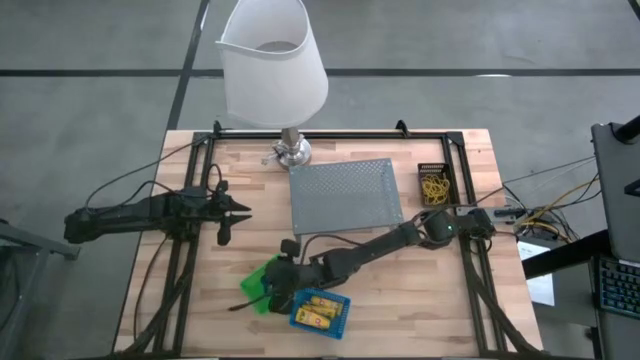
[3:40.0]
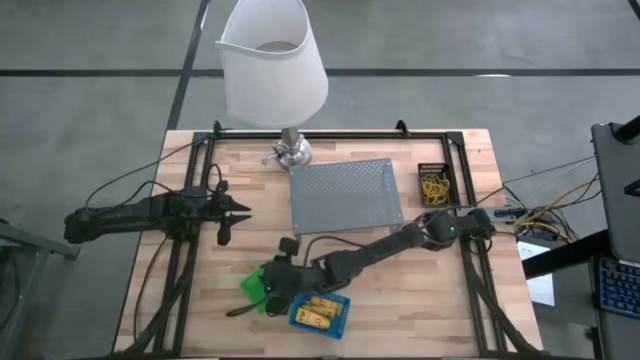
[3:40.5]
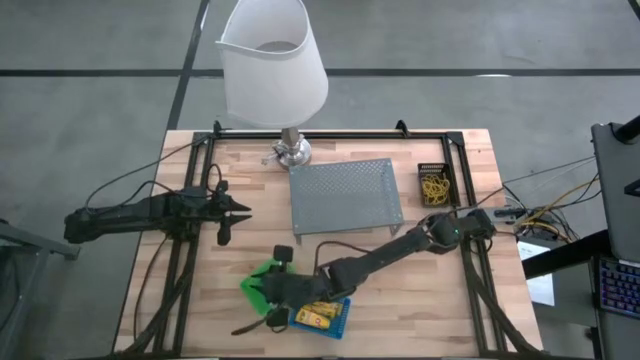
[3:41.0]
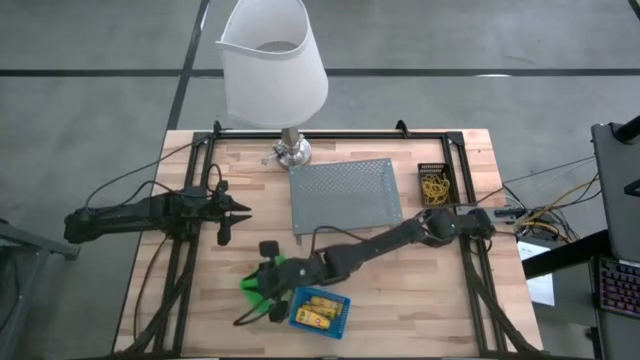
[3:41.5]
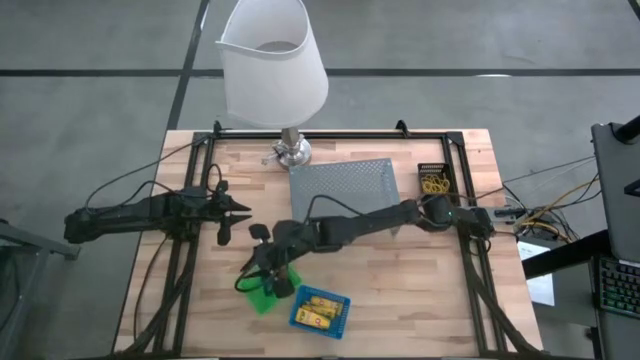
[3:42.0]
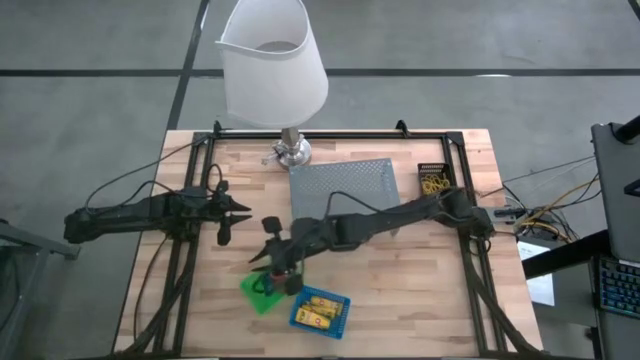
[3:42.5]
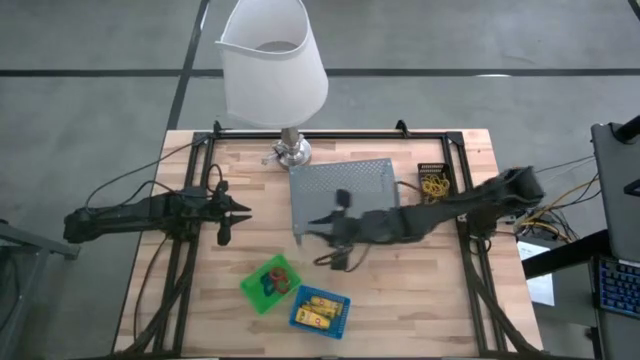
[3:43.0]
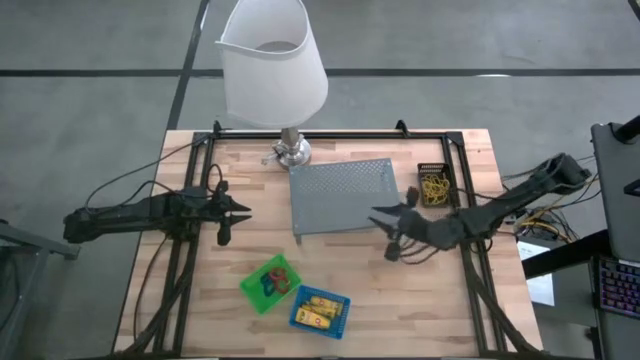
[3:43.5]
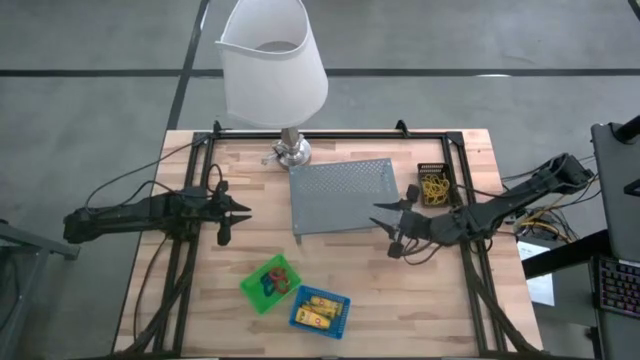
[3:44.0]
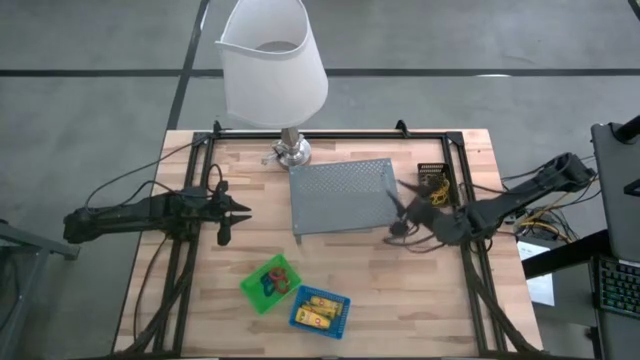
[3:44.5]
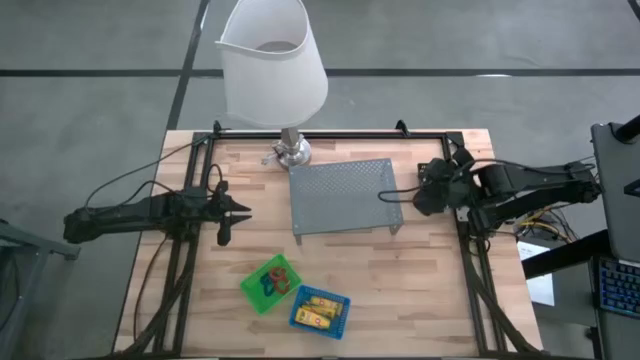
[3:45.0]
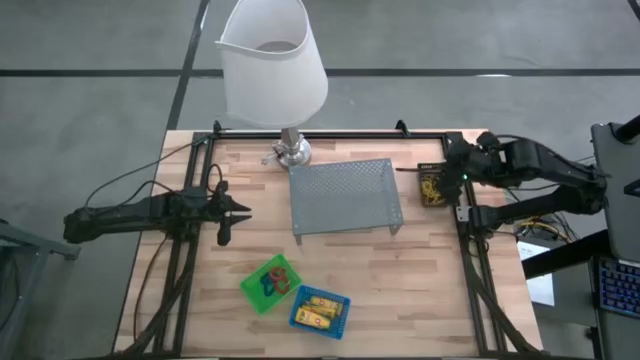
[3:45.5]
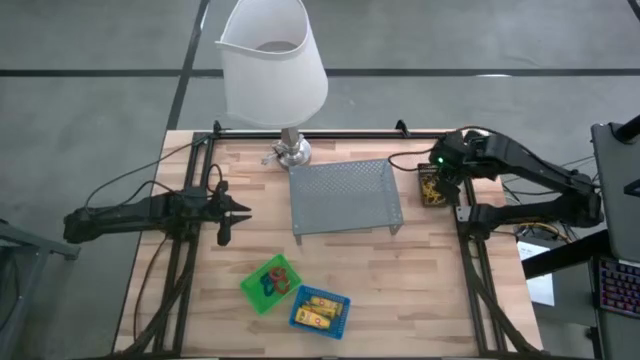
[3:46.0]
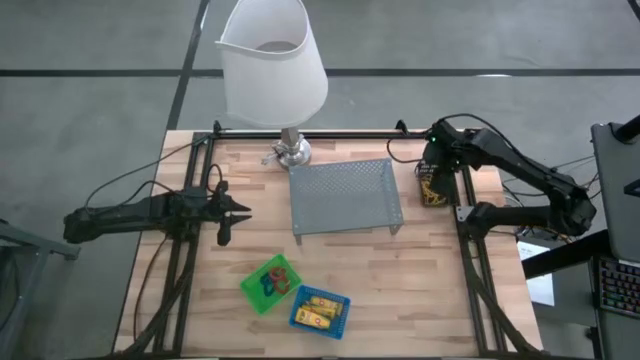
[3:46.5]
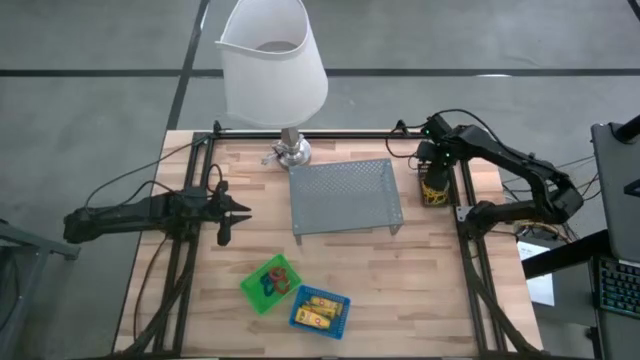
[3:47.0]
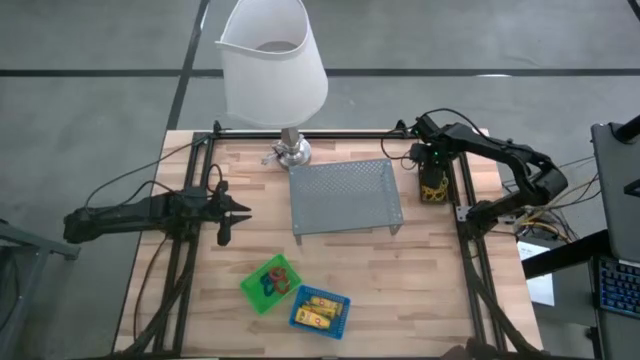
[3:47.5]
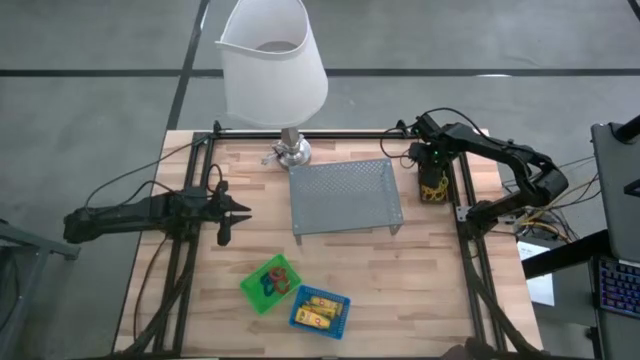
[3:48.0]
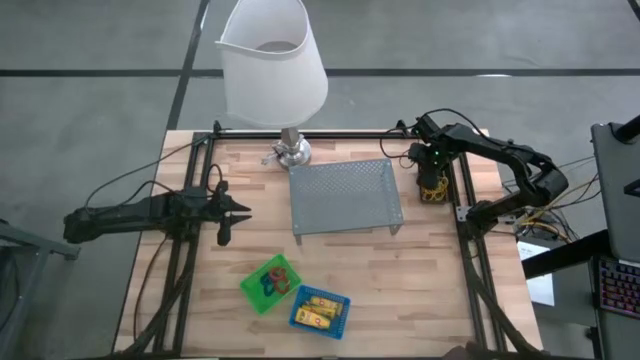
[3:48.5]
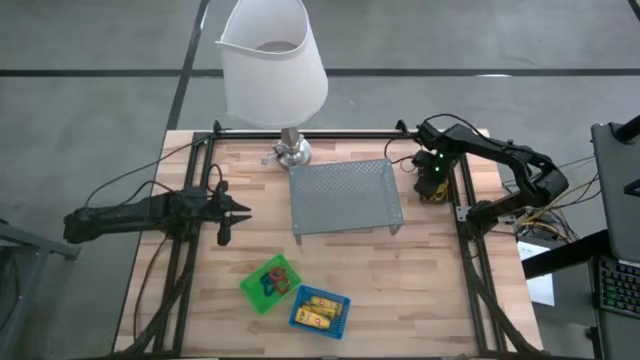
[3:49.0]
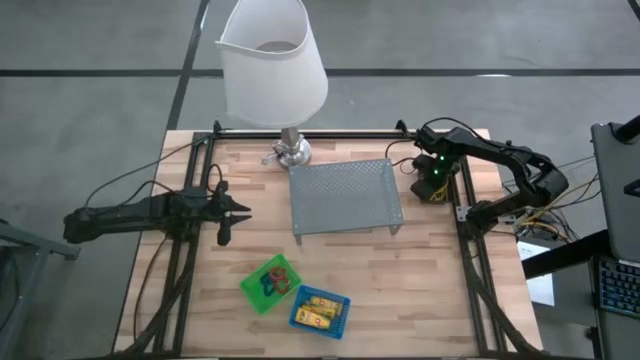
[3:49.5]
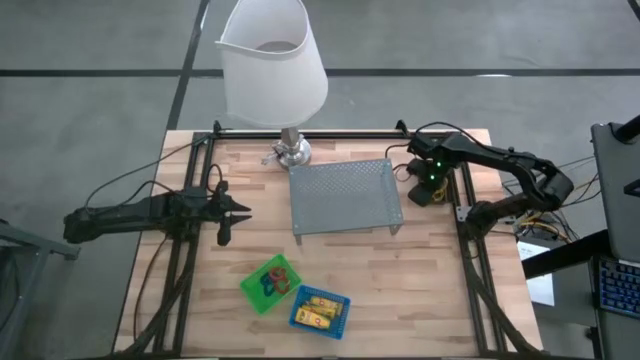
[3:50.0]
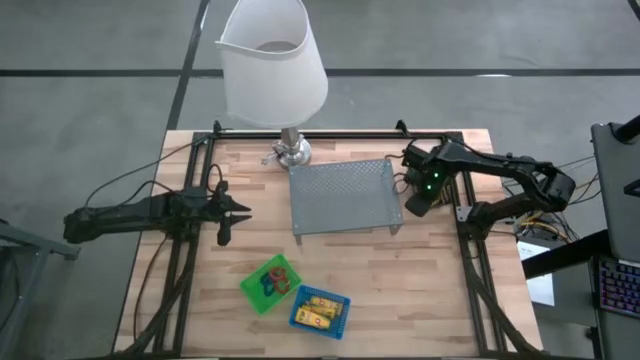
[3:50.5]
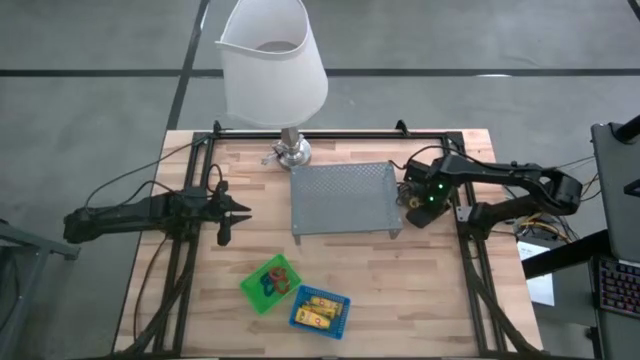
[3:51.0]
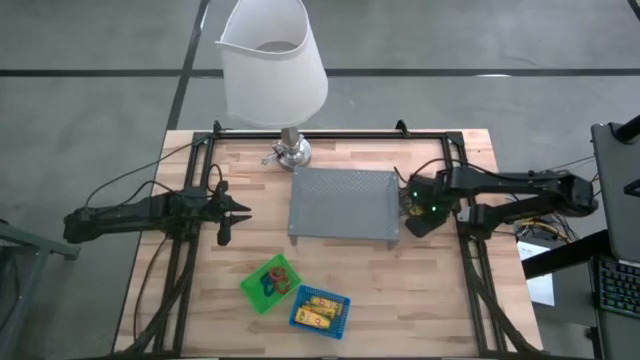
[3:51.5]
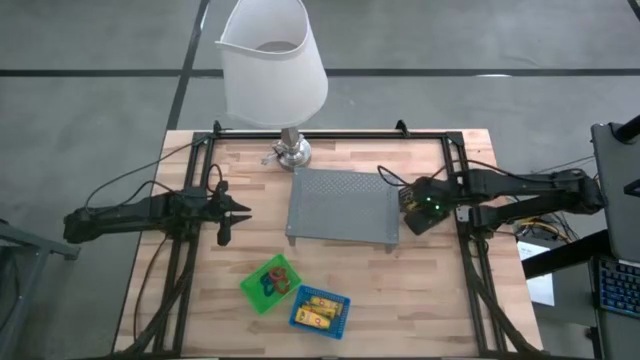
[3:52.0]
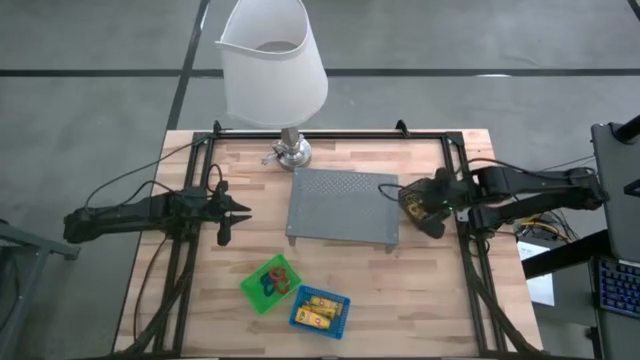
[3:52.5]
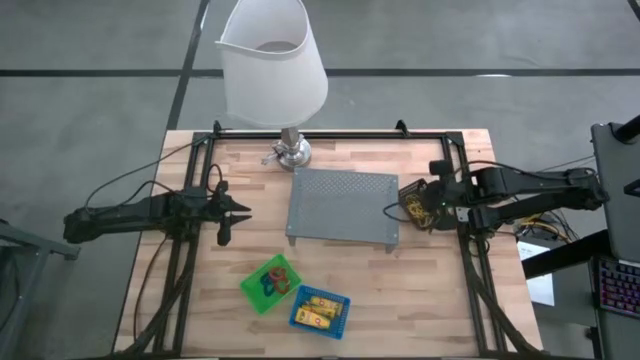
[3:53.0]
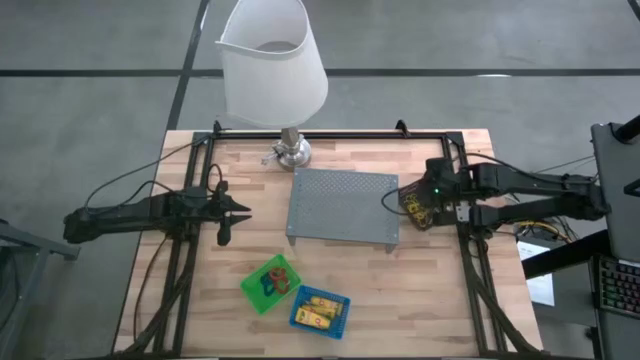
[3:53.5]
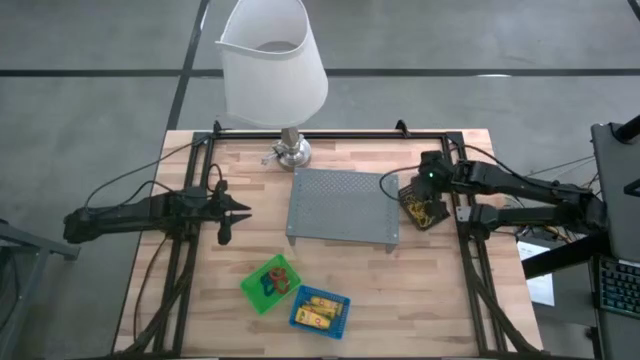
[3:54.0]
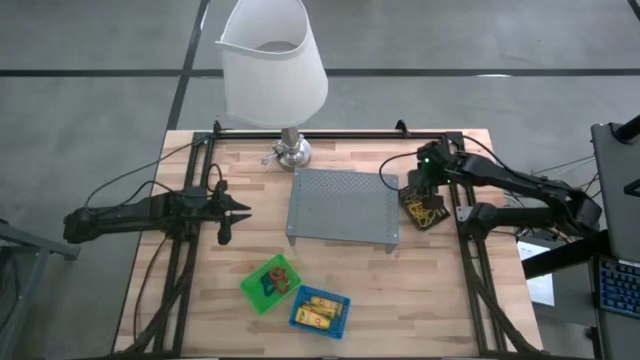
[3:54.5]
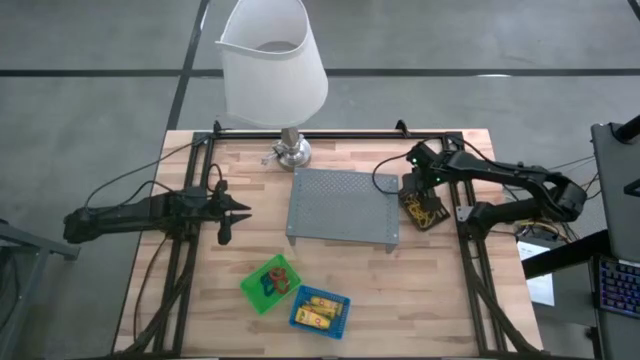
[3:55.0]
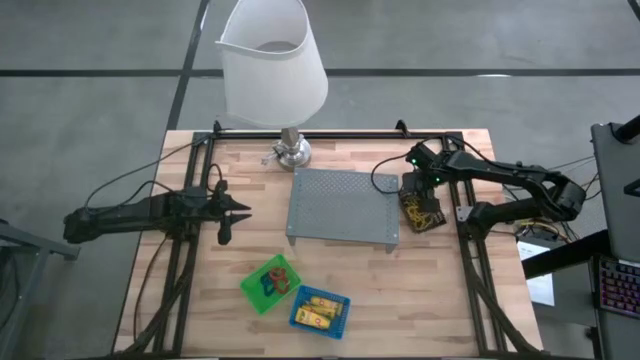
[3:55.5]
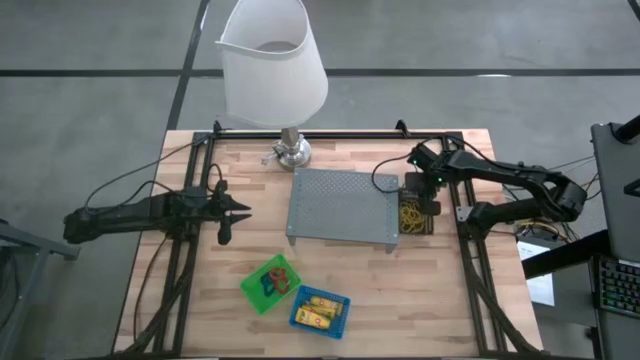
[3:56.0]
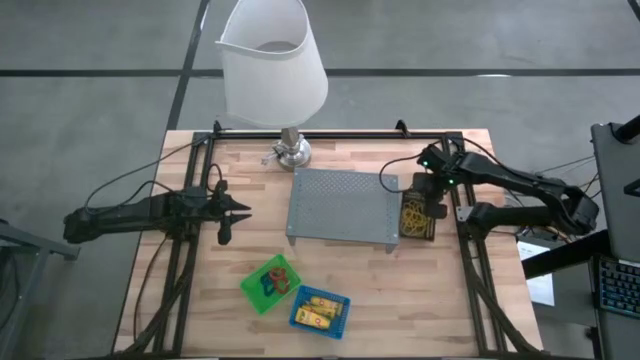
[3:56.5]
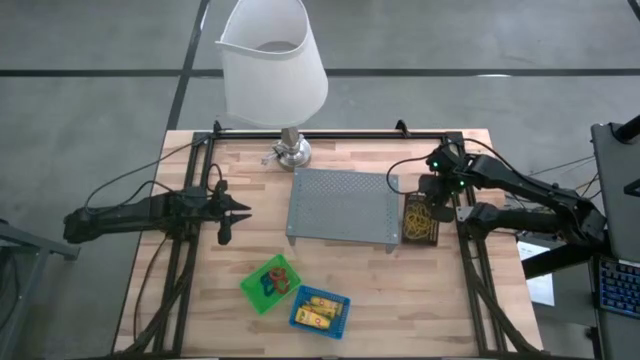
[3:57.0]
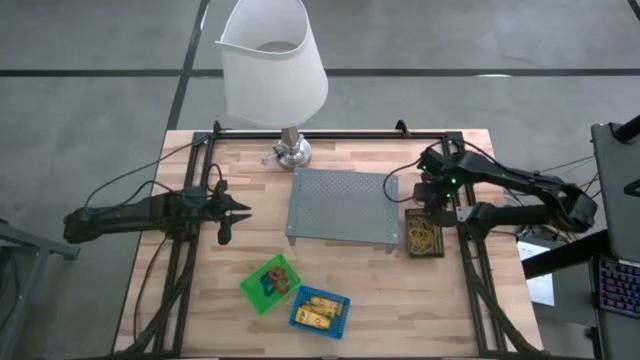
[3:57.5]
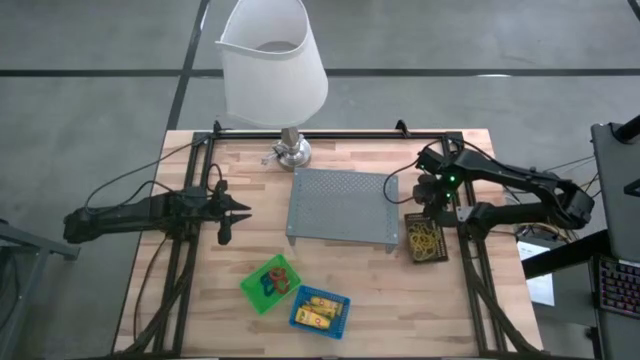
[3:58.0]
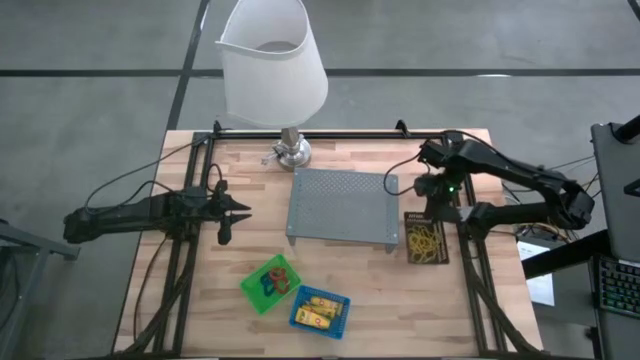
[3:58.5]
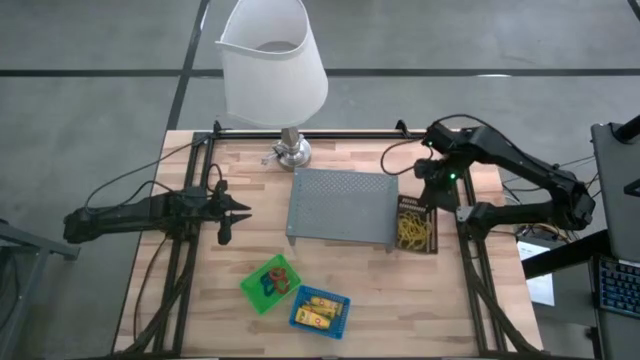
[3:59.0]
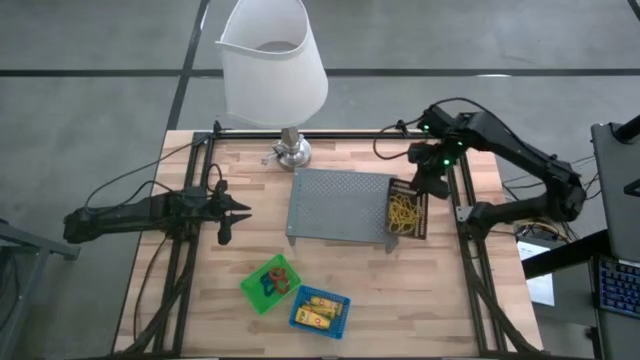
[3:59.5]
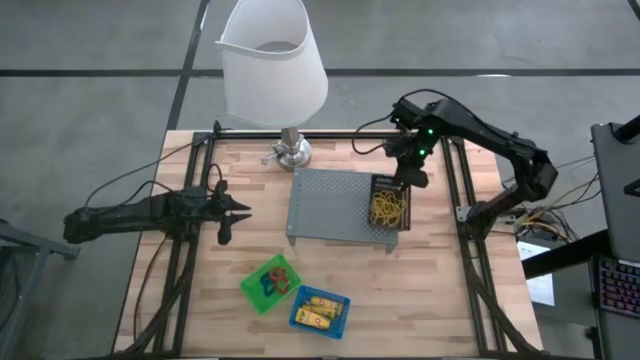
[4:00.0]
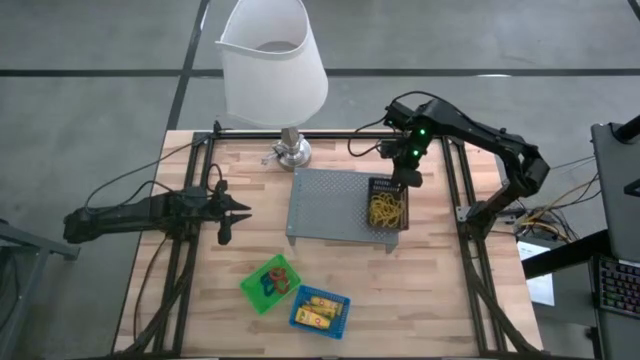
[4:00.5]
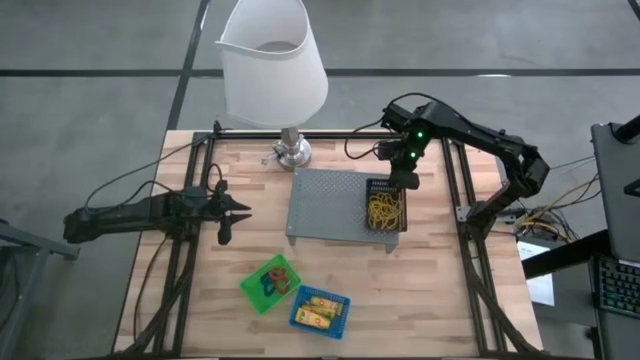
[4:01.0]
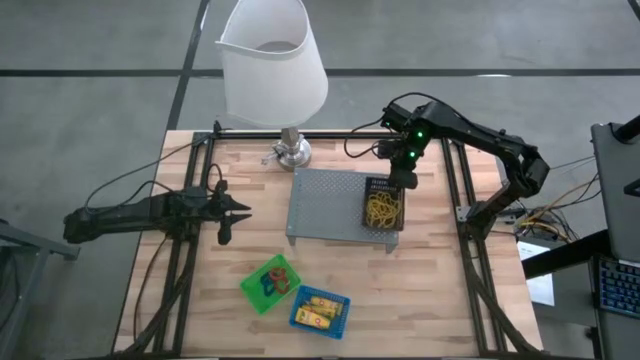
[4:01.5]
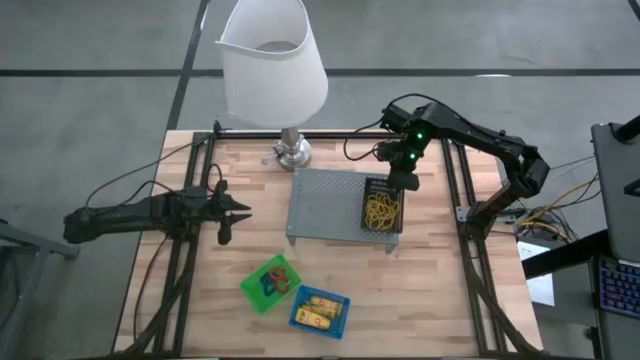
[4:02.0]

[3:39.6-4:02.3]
Task: Pick & Place Office Desk Supplies
Put the black basket on the shelf
